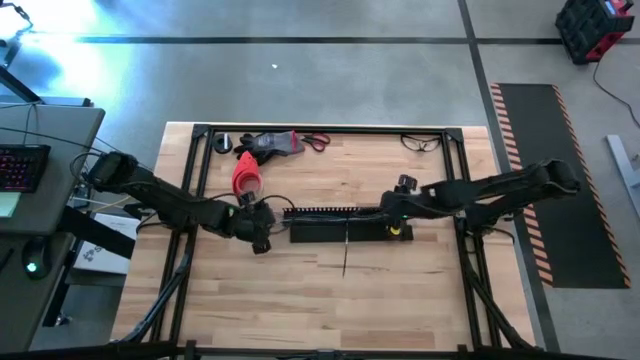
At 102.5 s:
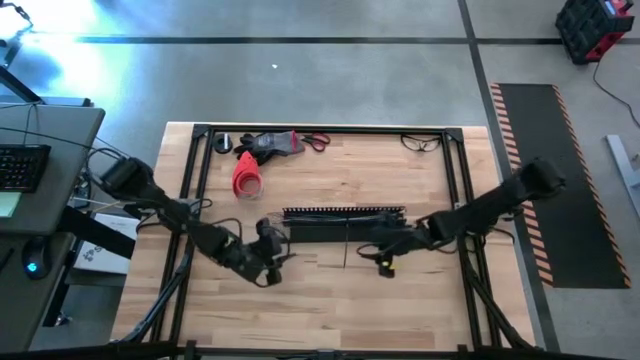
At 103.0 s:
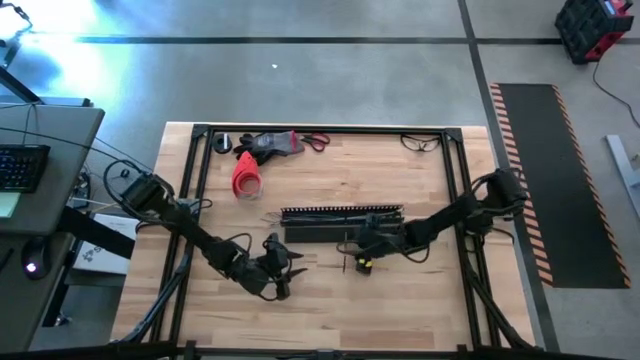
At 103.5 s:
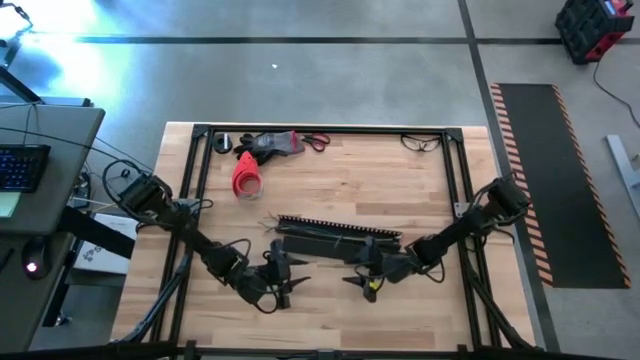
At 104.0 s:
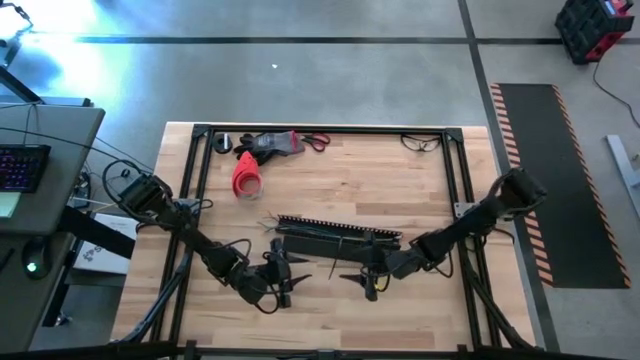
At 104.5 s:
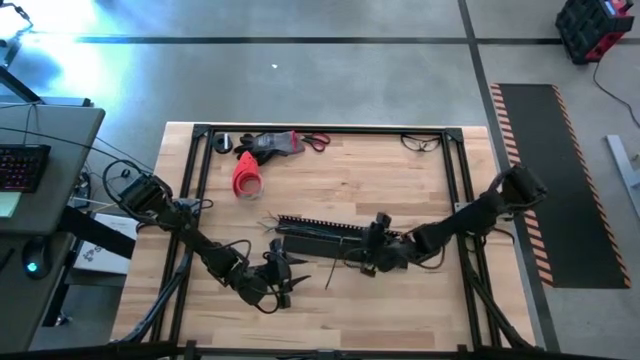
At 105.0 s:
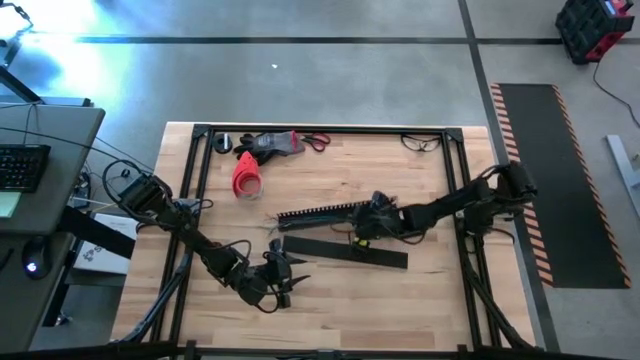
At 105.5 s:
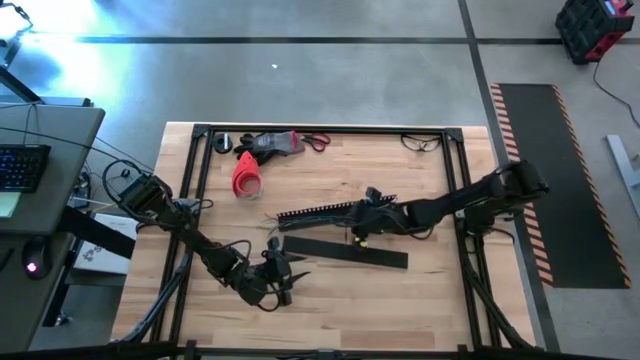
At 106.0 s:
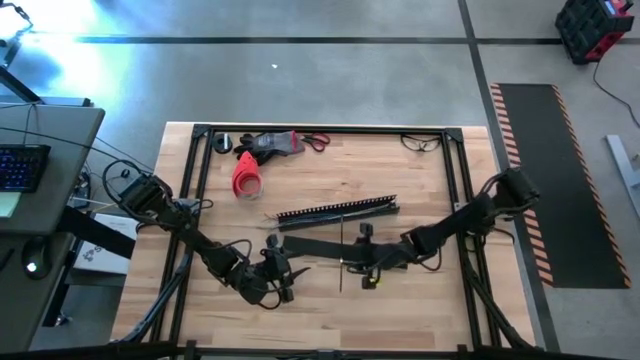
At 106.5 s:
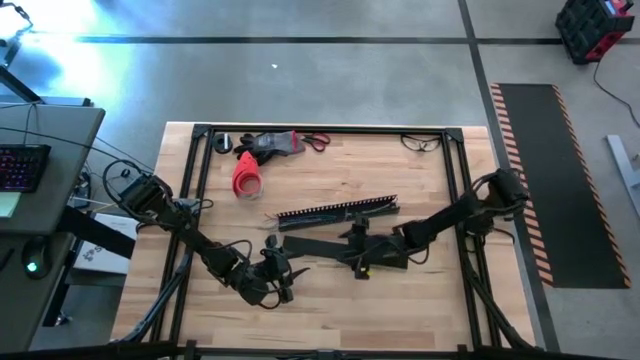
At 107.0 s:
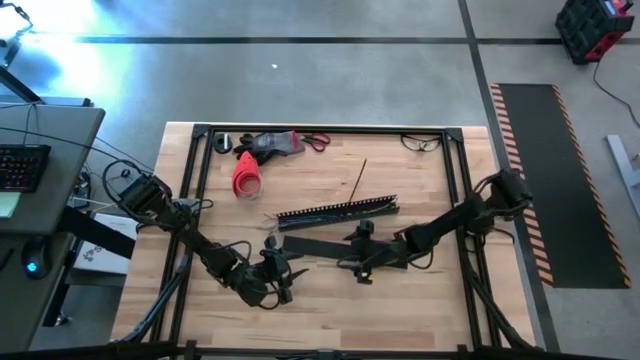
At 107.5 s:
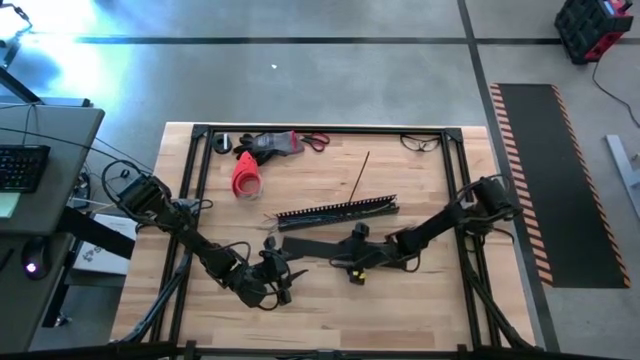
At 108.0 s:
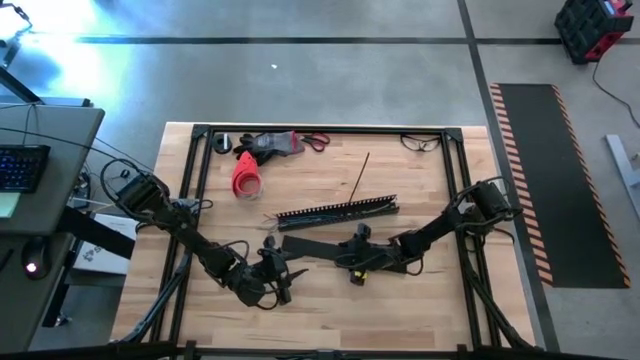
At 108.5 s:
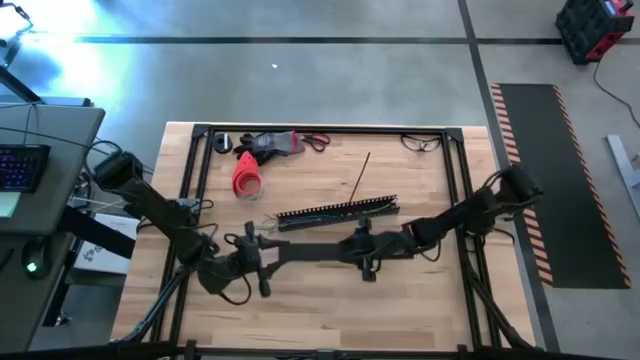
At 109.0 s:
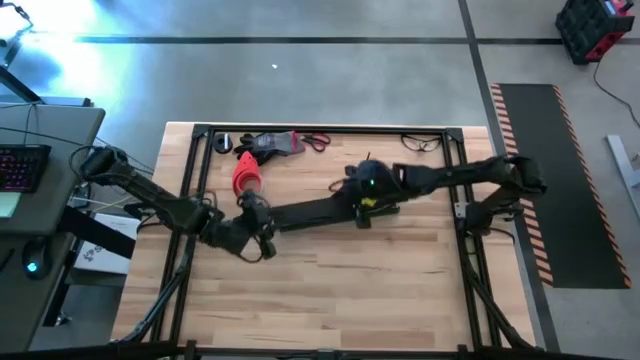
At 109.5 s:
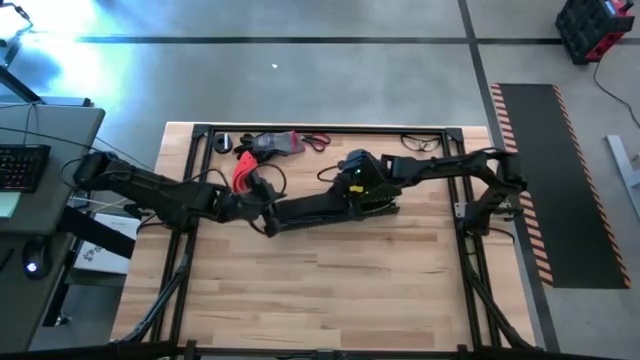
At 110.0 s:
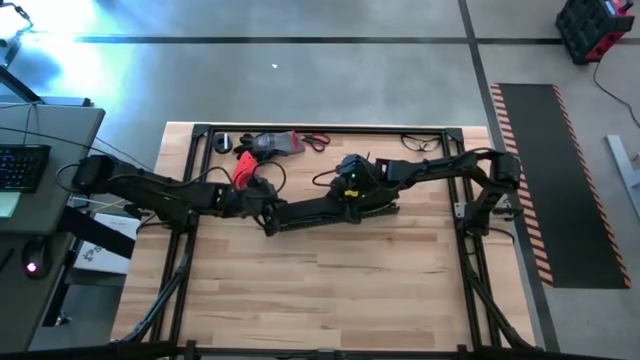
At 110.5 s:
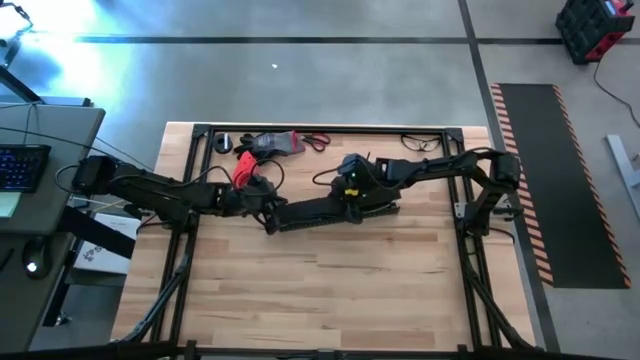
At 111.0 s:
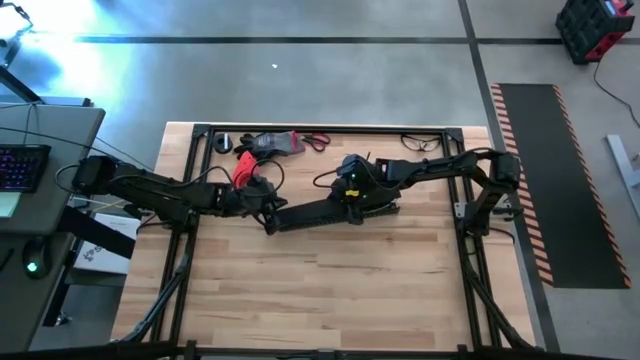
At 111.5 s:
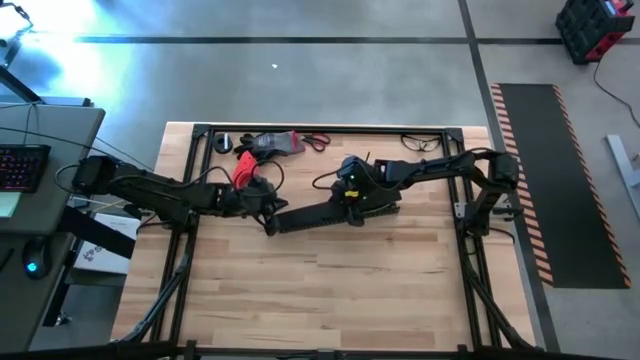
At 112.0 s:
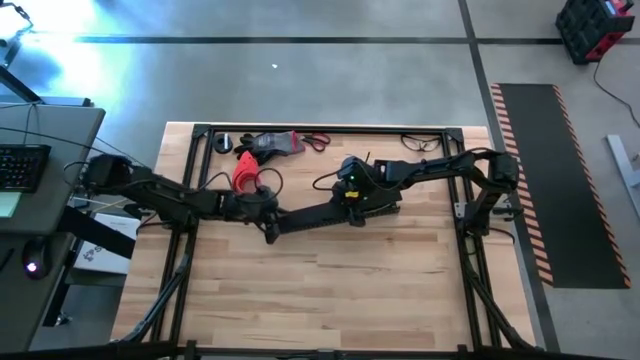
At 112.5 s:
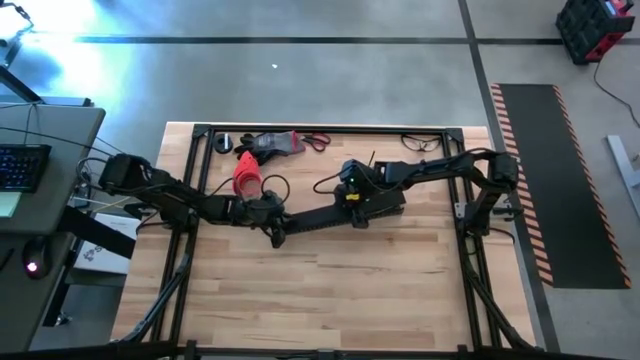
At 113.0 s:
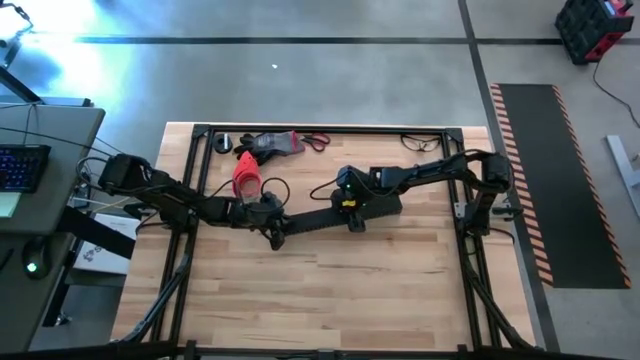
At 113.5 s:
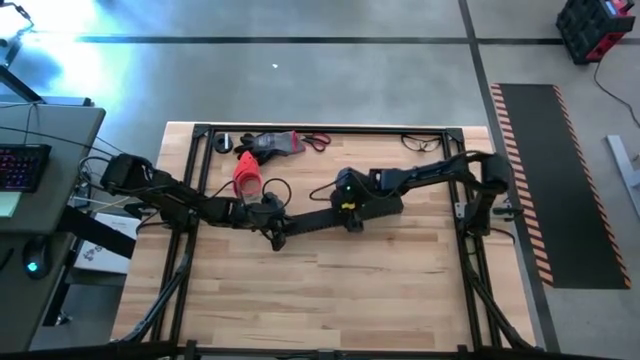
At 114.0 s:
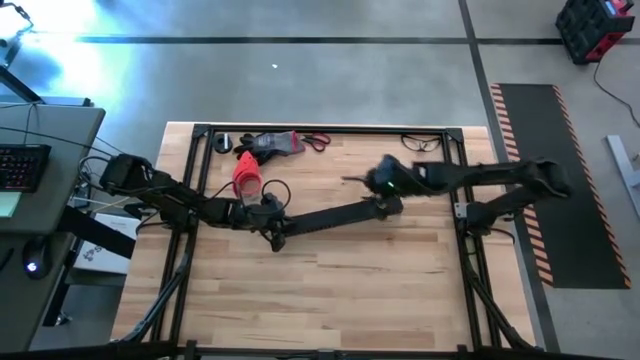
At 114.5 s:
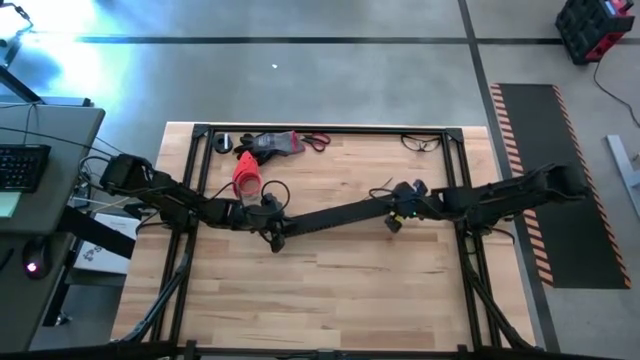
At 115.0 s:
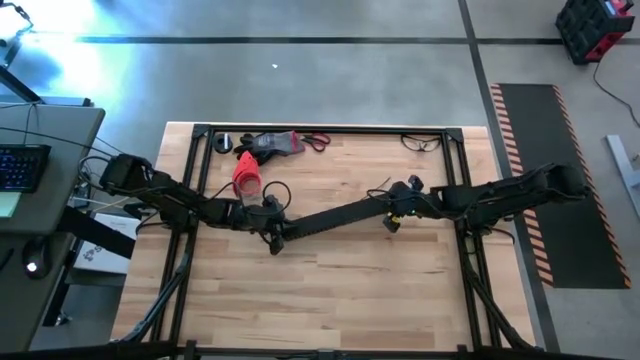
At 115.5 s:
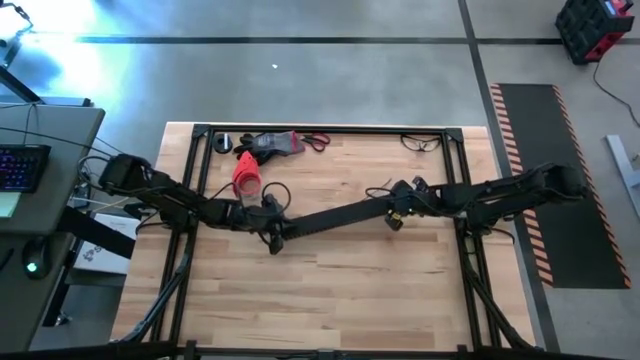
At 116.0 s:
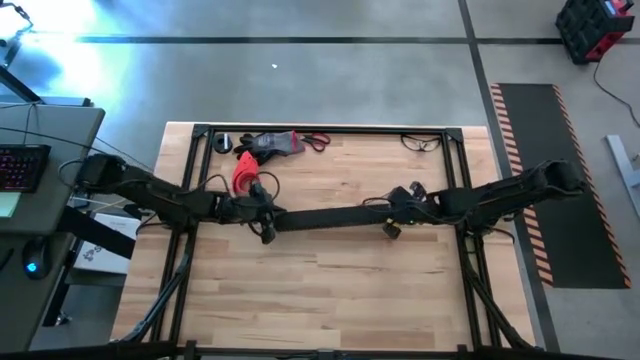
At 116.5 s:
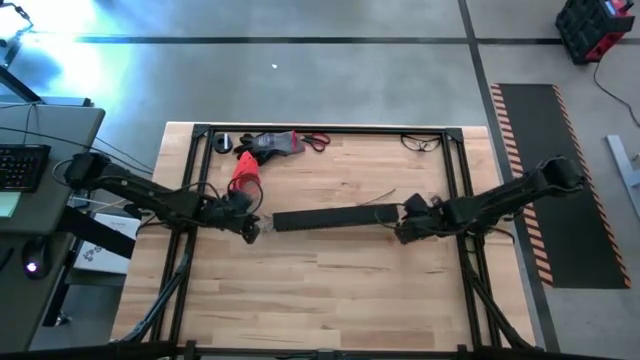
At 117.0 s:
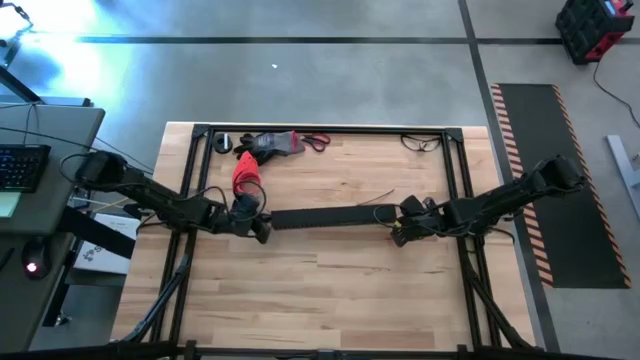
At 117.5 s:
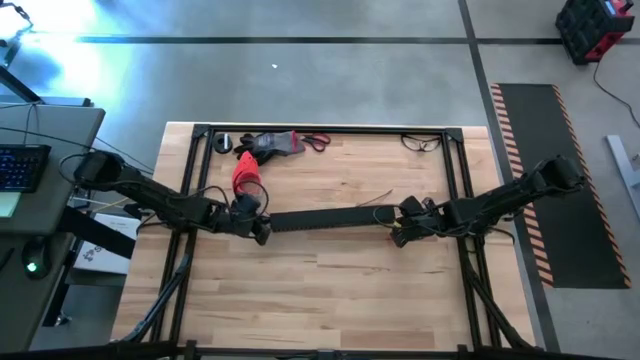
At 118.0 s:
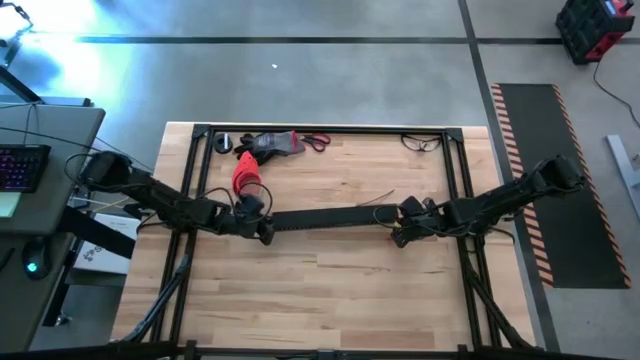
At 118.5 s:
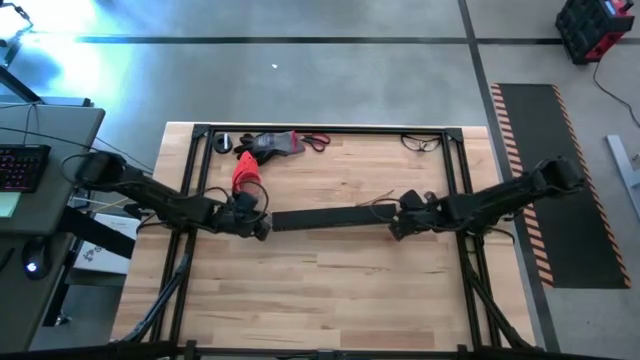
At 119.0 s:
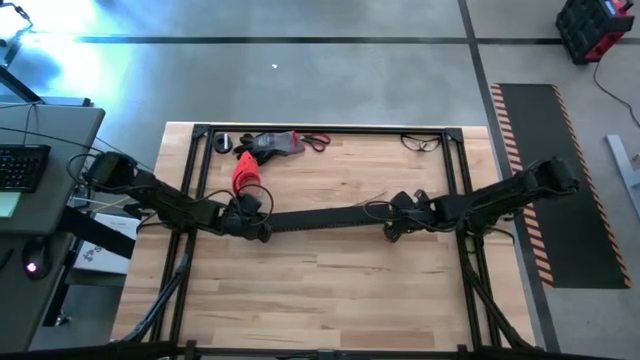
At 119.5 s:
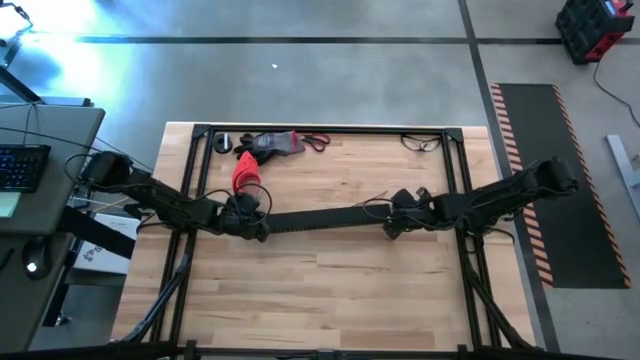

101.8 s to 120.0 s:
Task: Ziptie cables
Close the black cable duct

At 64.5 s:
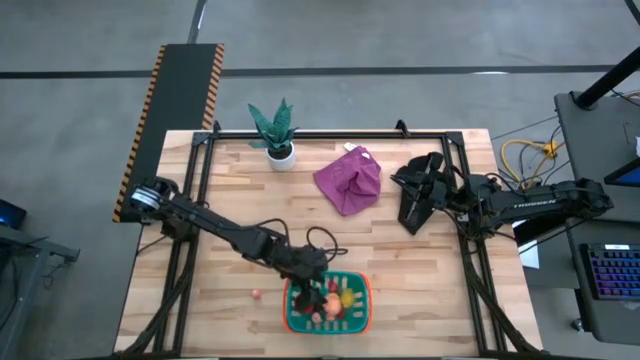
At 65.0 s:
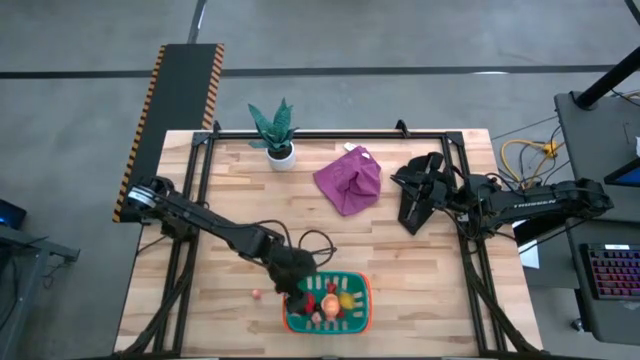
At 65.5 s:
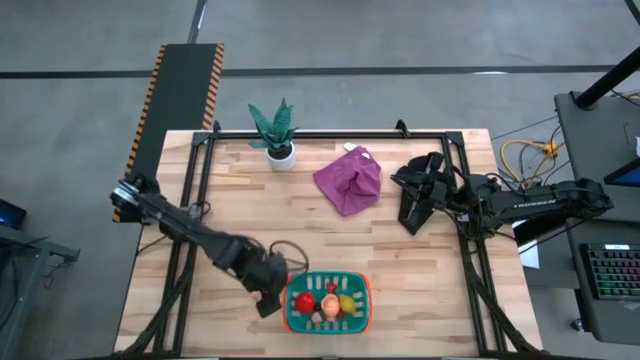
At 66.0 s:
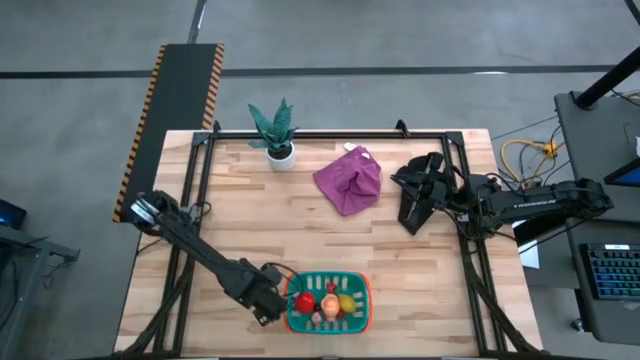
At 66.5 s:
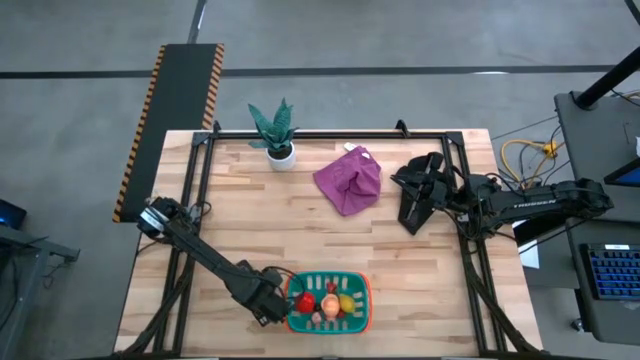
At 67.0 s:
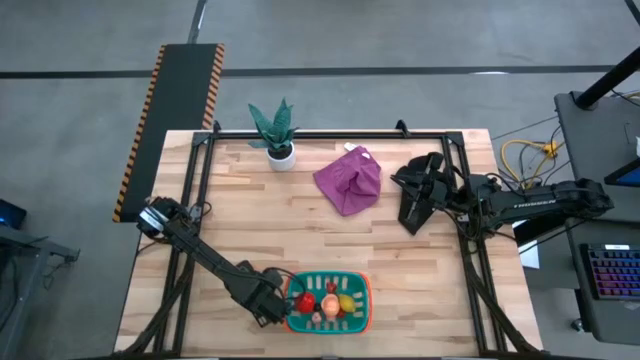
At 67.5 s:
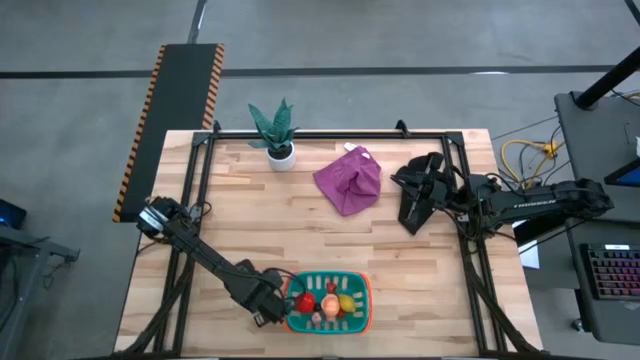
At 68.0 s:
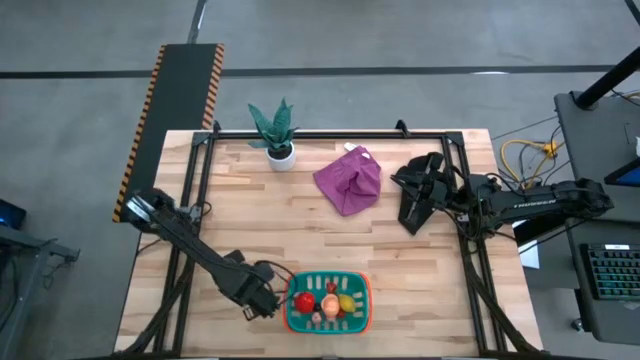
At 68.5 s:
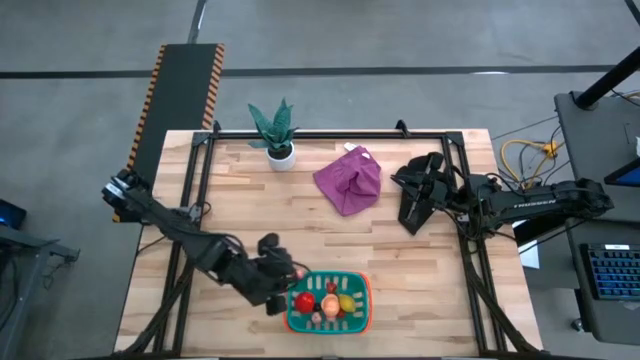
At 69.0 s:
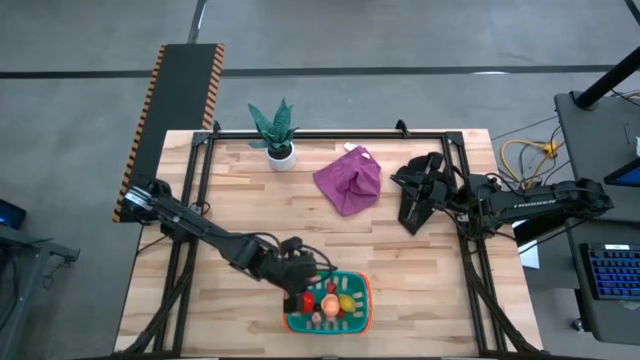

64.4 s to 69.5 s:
Task: Pick and placing Produce into tupperware
Put the pink peach into the green basket
